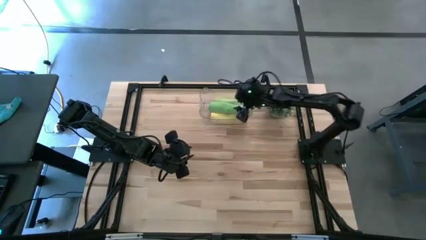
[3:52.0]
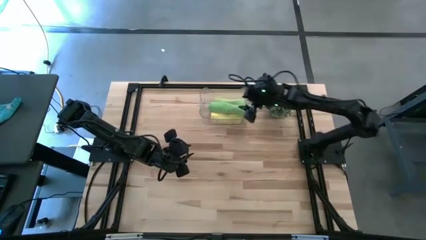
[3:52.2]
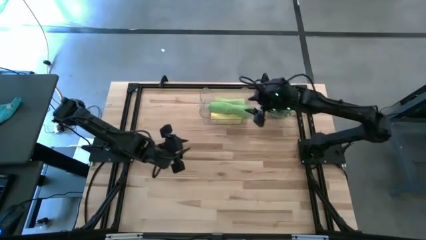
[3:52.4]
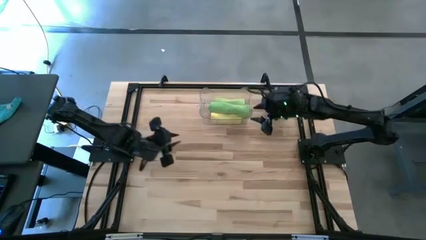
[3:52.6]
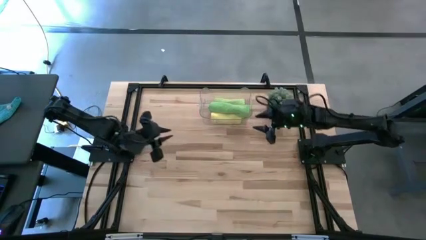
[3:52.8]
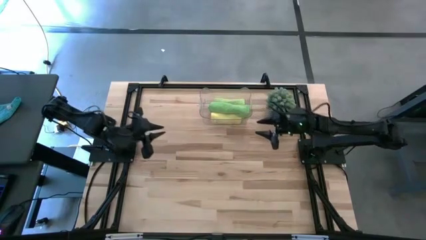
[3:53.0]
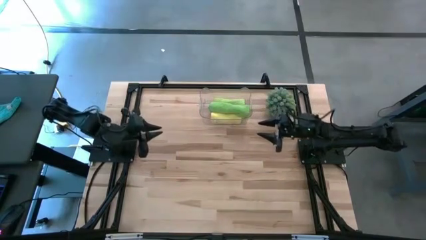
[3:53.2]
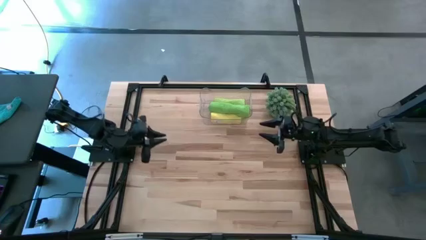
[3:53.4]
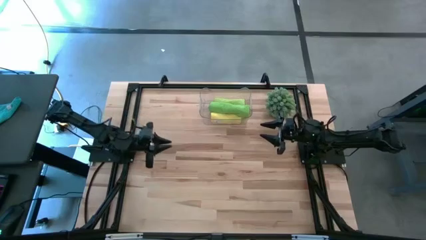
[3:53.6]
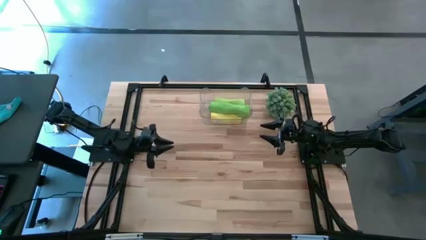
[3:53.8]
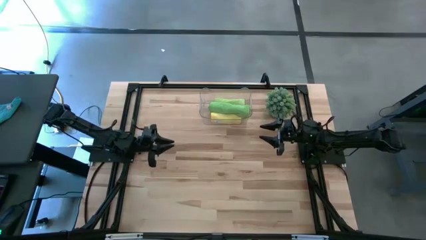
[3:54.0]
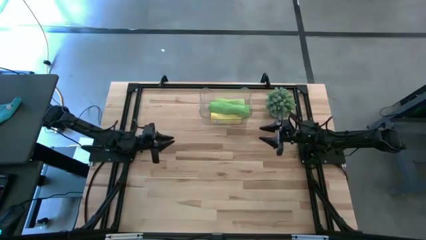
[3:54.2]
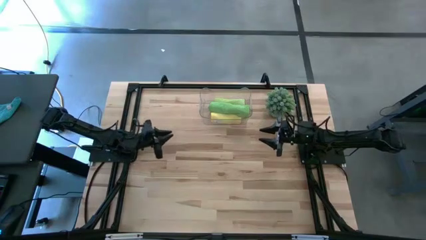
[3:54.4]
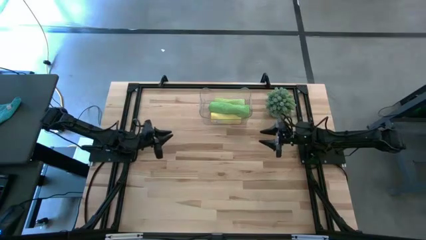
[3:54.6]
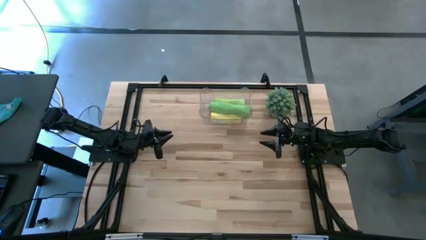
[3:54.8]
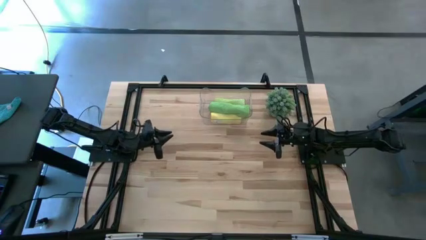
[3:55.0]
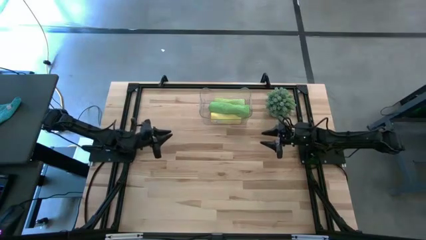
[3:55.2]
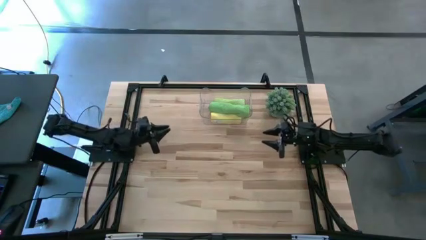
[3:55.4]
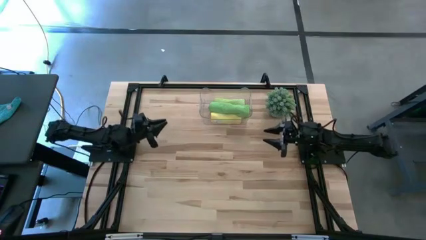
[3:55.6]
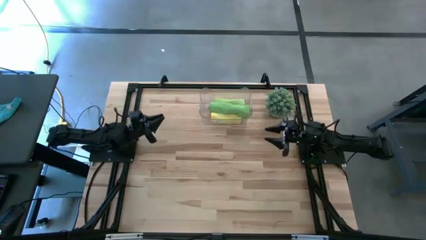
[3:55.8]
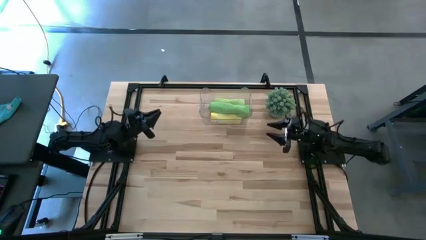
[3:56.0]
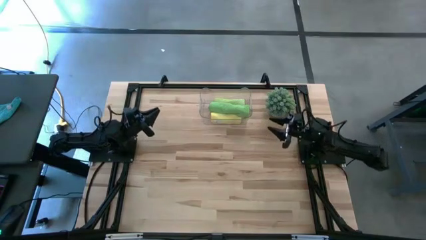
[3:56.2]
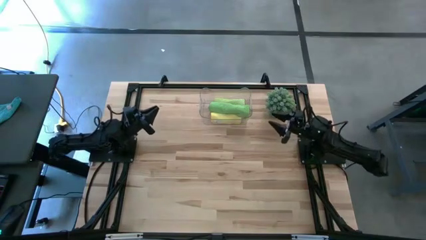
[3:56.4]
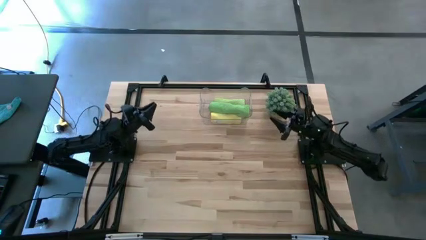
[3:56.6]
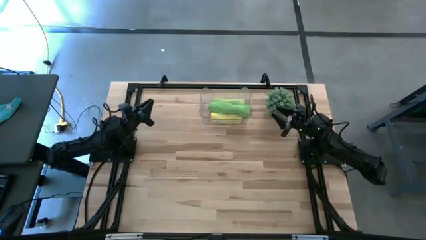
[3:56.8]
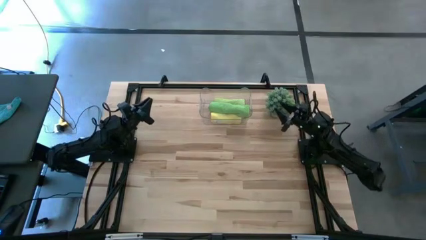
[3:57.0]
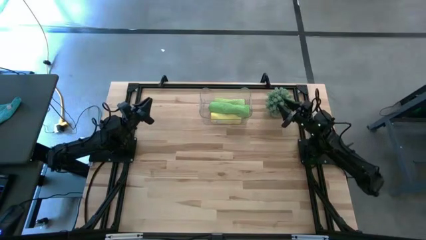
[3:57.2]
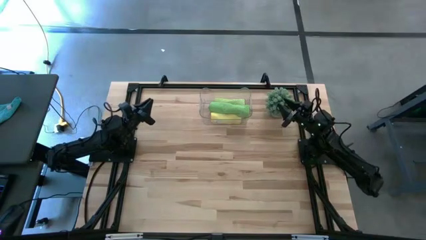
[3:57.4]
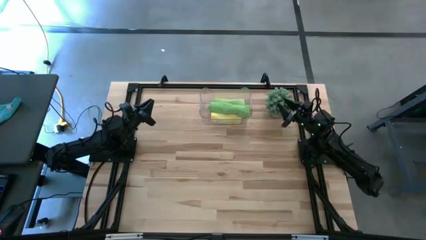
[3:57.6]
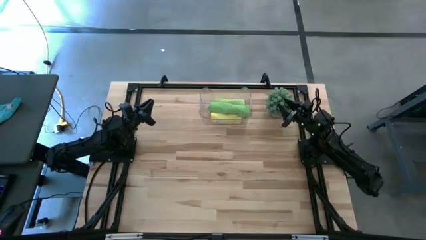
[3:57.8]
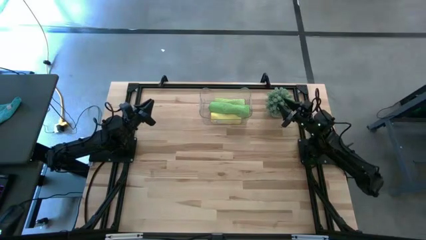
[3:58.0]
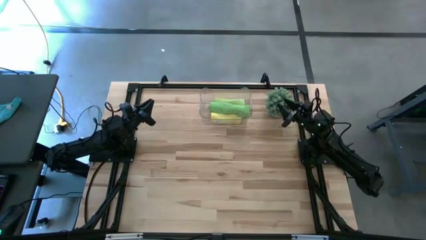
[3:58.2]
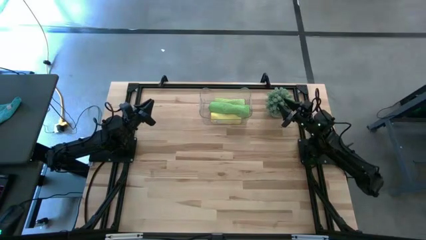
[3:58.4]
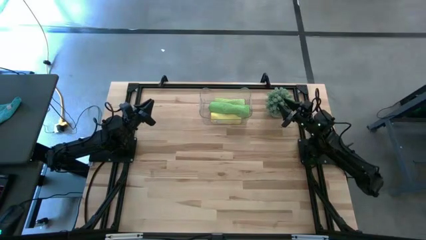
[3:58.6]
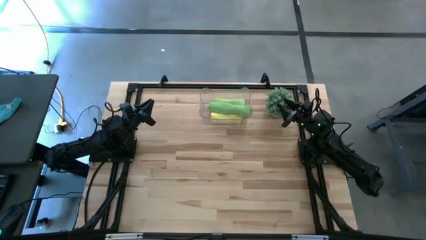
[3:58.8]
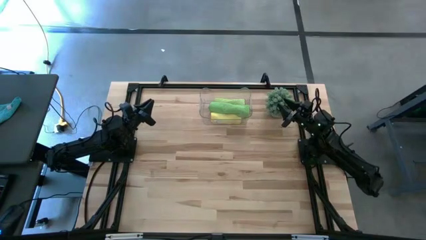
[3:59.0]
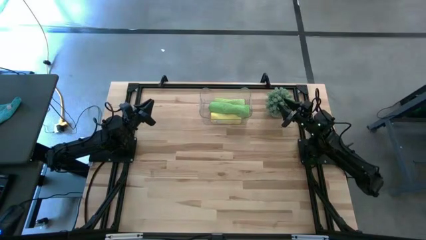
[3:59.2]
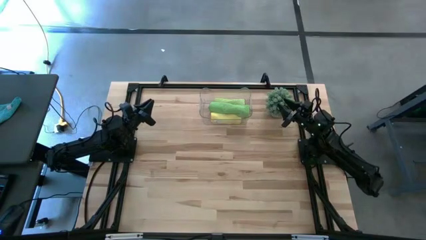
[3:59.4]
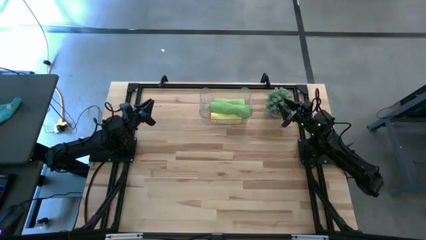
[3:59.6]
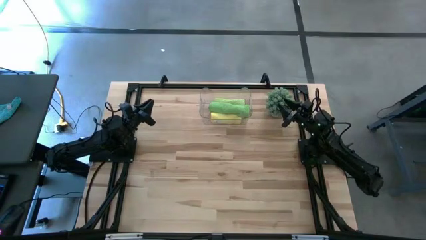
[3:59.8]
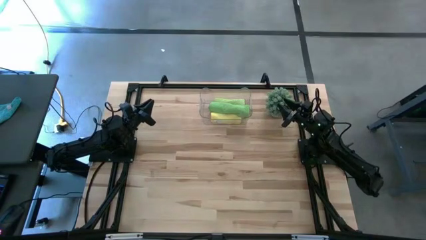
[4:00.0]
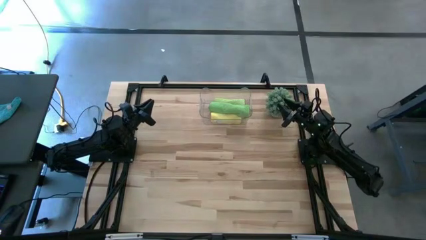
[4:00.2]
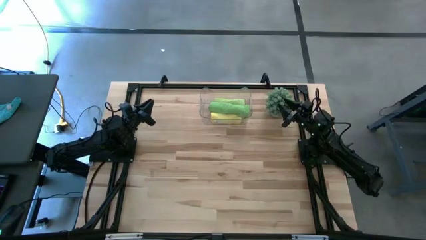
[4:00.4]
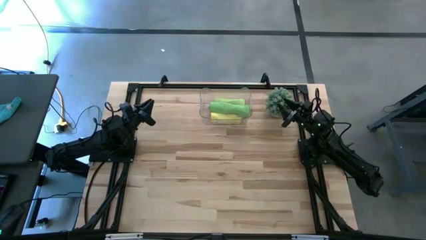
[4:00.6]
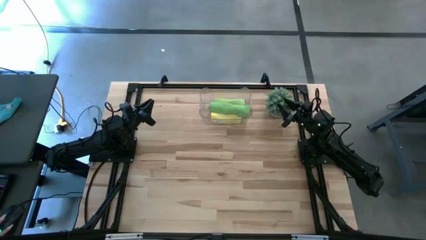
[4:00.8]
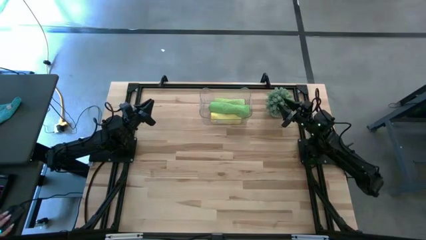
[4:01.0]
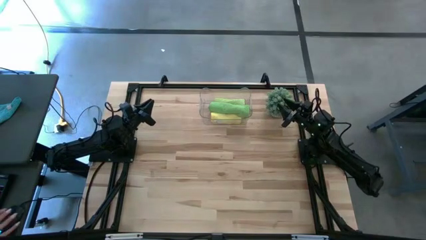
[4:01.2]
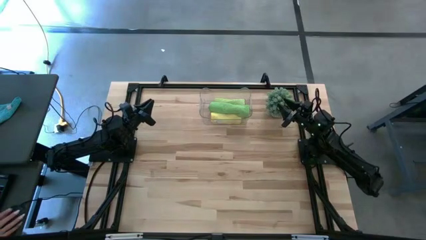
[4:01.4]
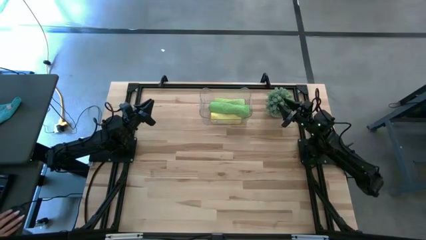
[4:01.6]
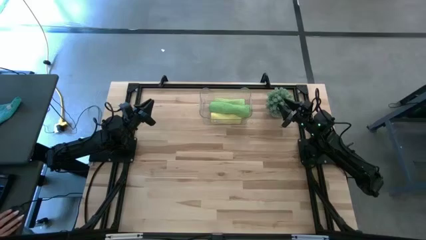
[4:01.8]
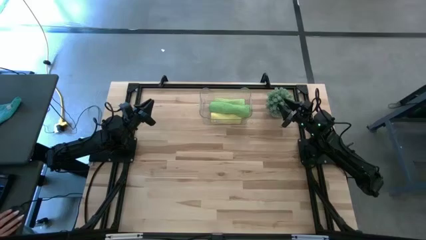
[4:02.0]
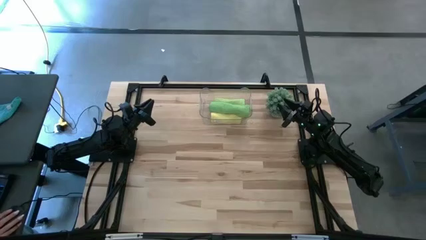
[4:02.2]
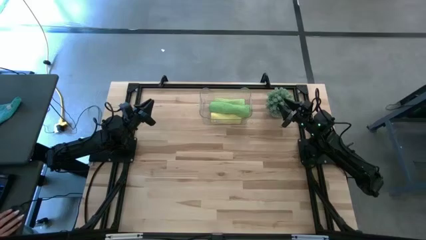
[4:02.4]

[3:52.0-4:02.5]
Task: Roll microfiber towels into tight, uniform cylinder then place into a basket
Return to Home Position
